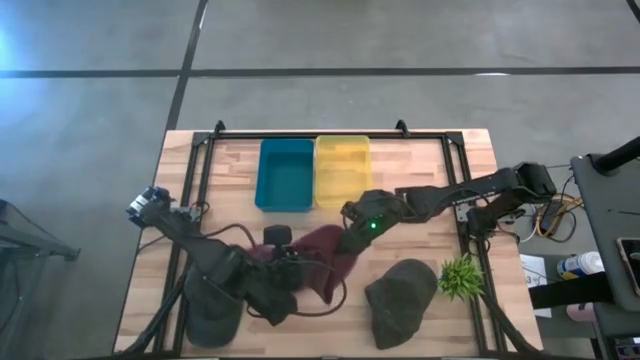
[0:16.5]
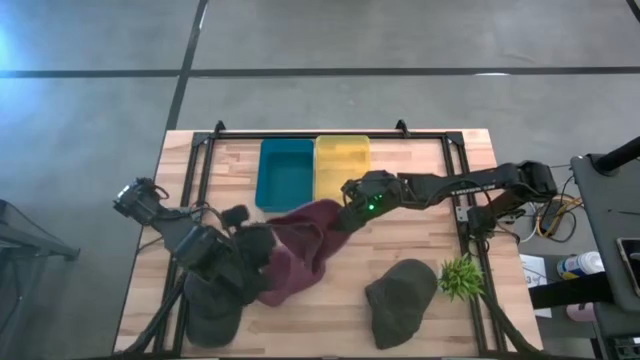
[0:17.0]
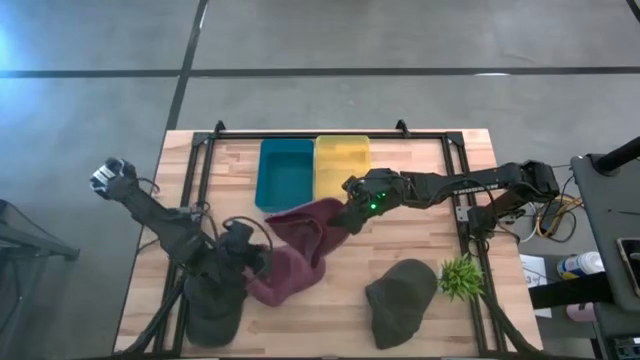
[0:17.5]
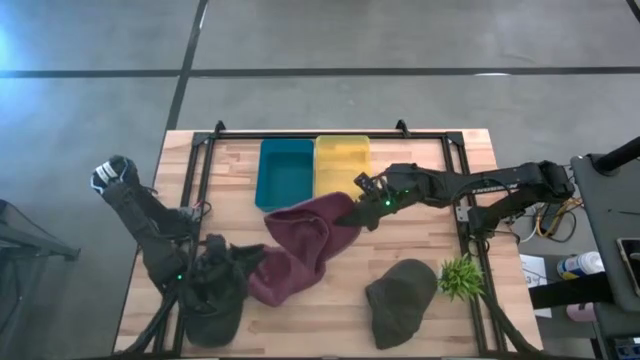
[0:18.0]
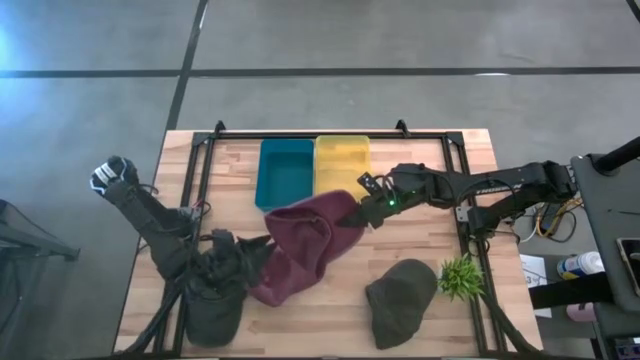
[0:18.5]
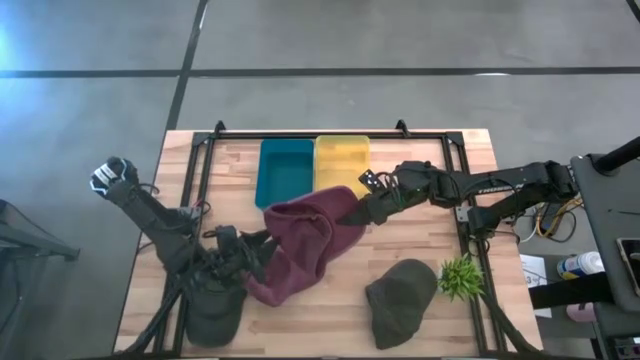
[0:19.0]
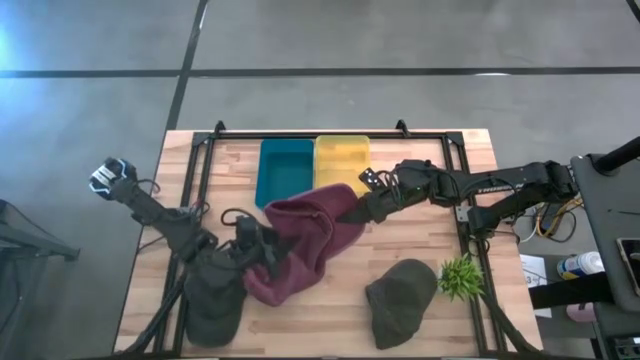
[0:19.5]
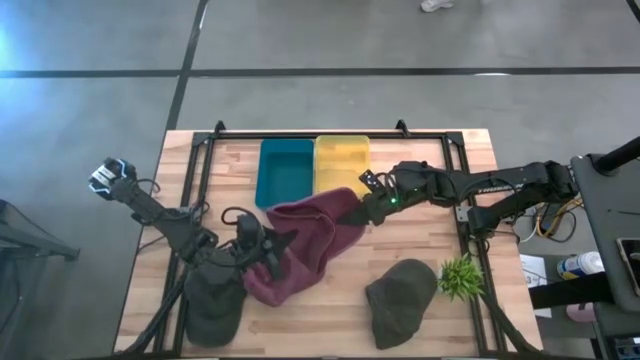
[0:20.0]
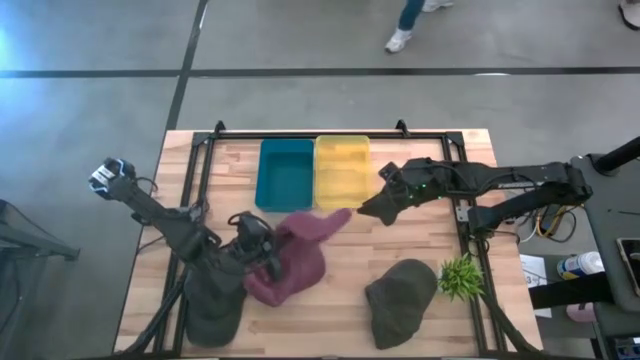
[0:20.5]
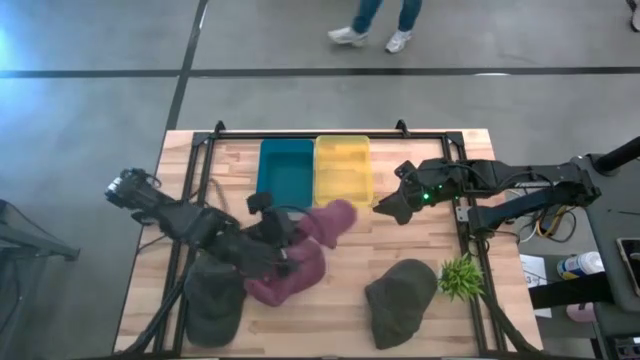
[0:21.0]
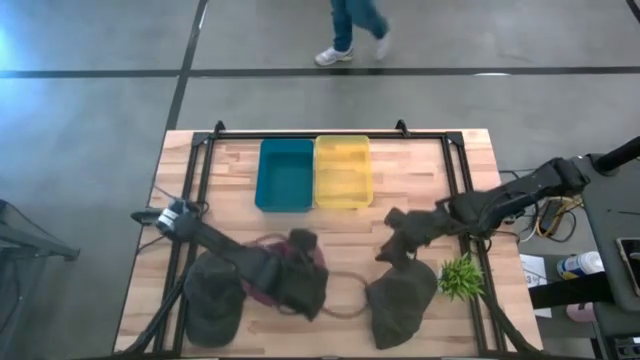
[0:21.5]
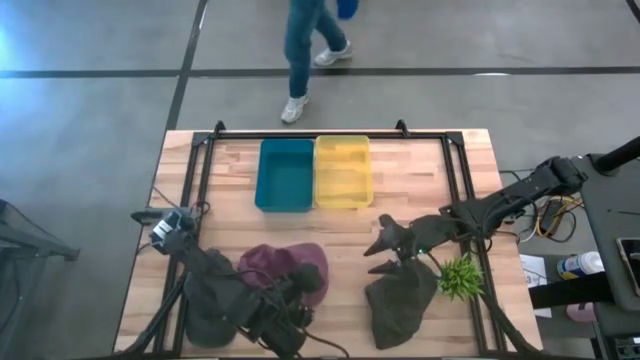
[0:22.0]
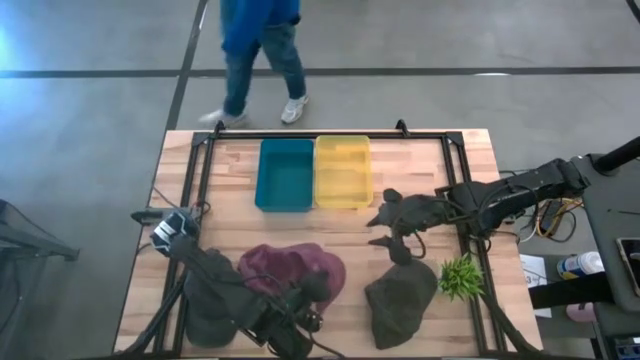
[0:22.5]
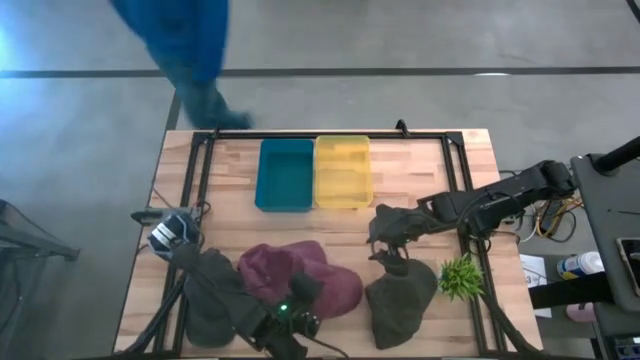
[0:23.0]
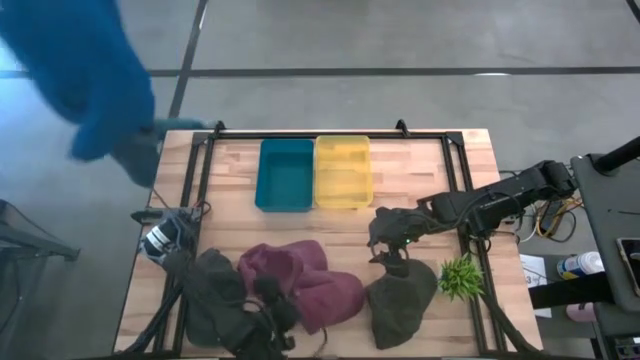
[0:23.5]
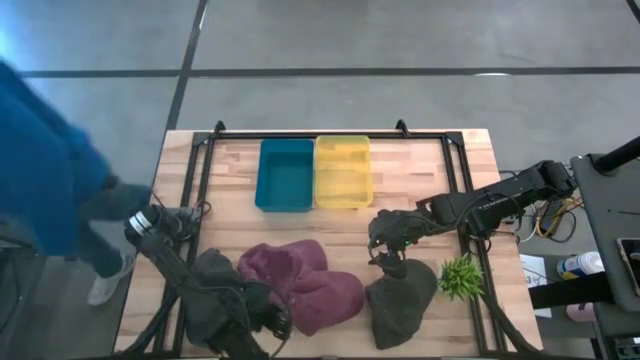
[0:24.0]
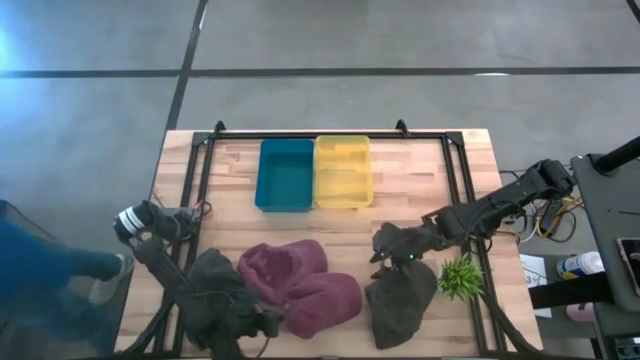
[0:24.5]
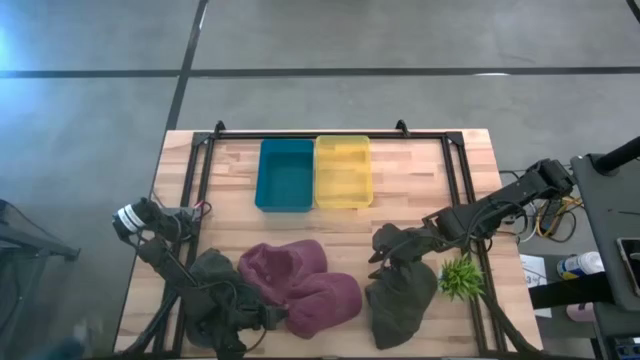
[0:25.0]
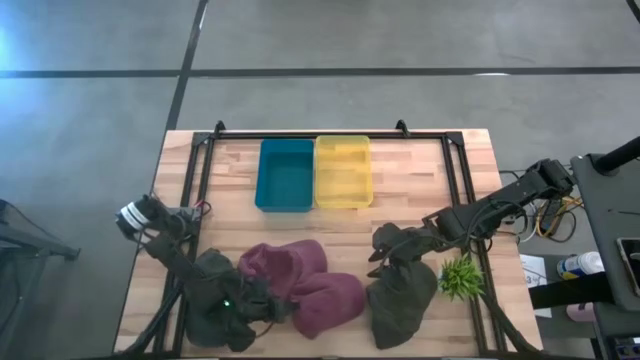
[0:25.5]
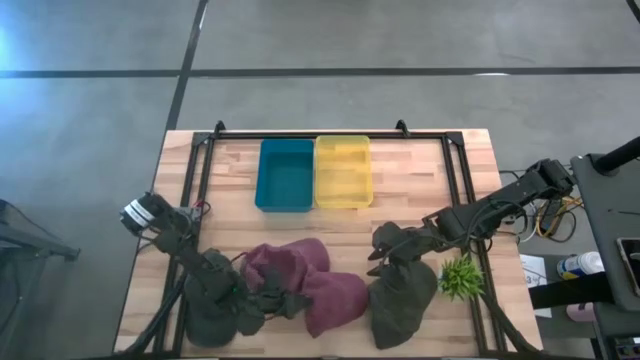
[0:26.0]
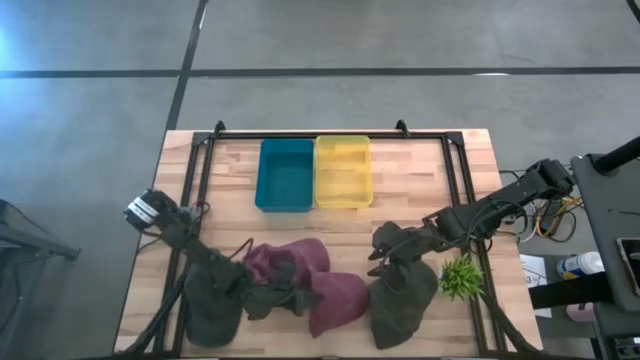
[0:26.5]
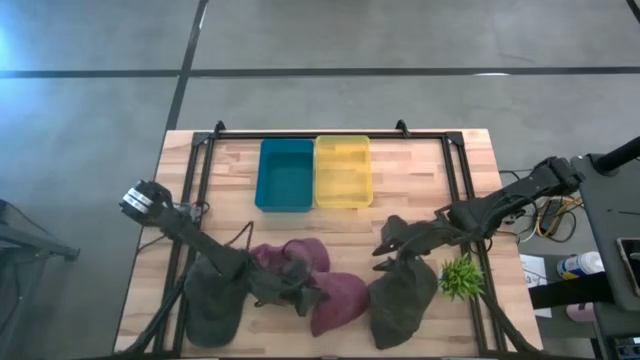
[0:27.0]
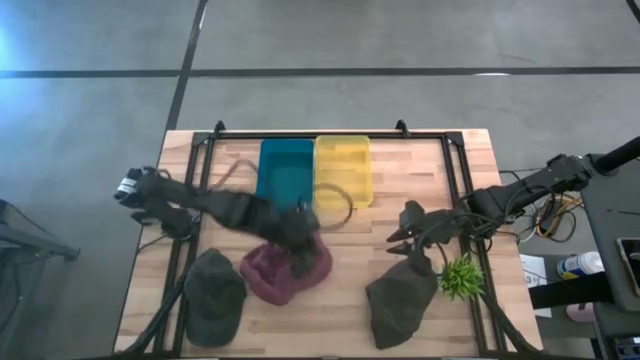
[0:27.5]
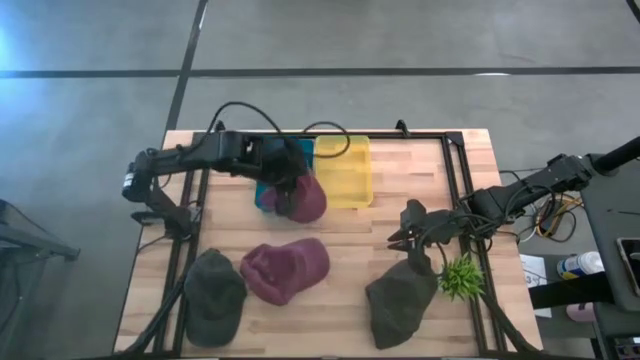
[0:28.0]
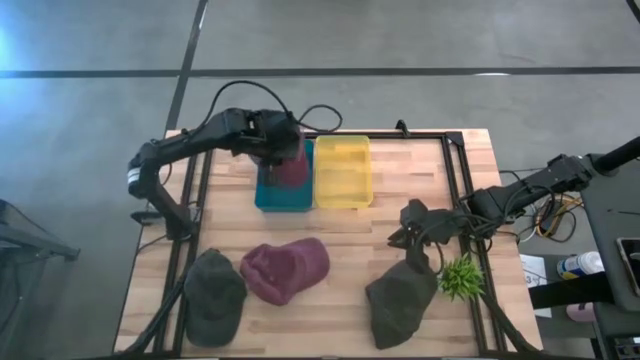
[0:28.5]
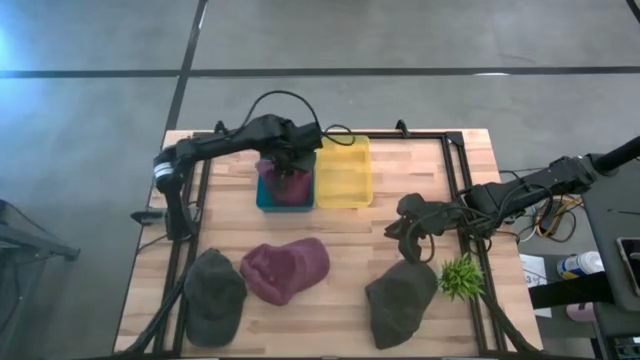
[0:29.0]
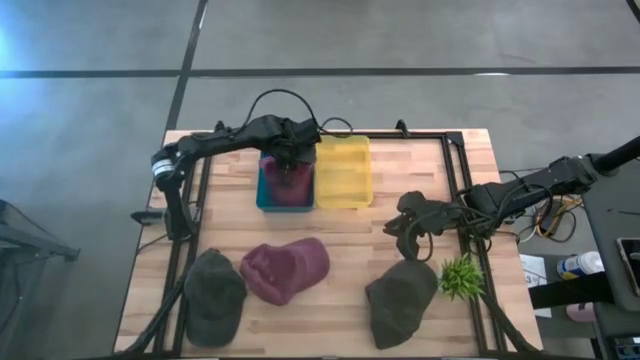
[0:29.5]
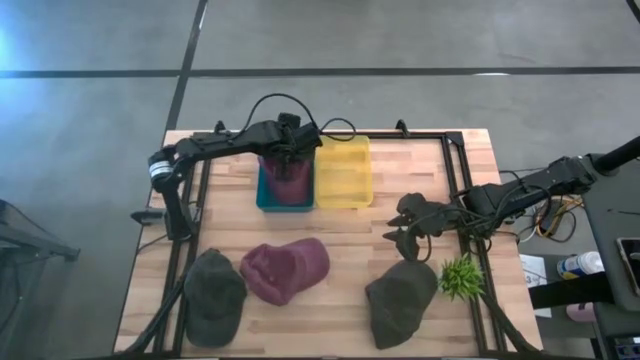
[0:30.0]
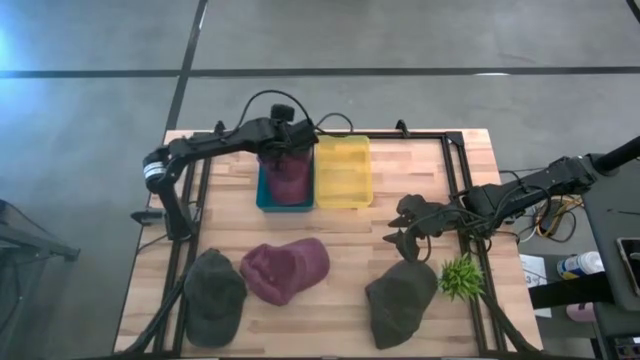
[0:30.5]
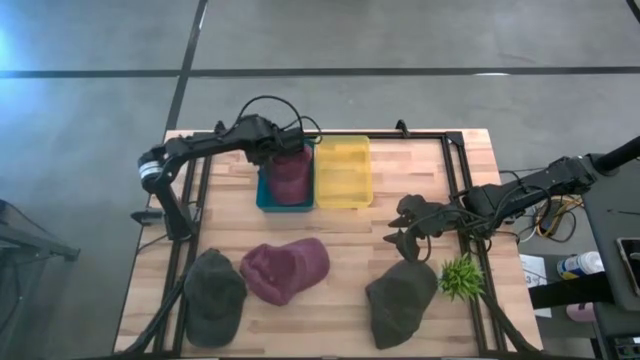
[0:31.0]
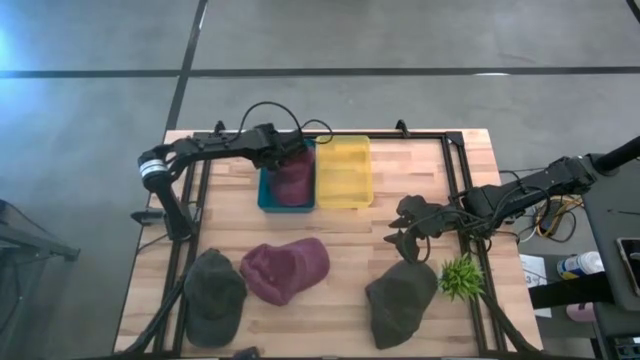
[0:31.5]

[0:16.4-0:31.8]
Task: Pick & Place hat
Put the top pink cap into the blue bin

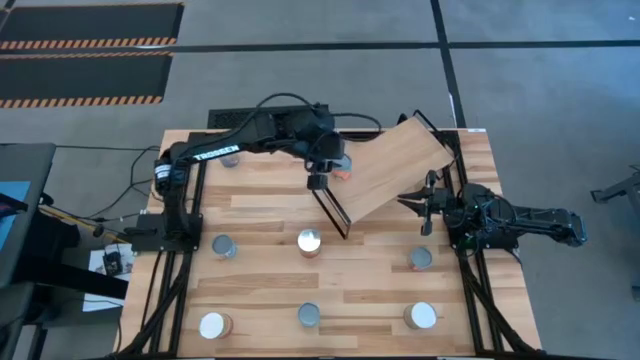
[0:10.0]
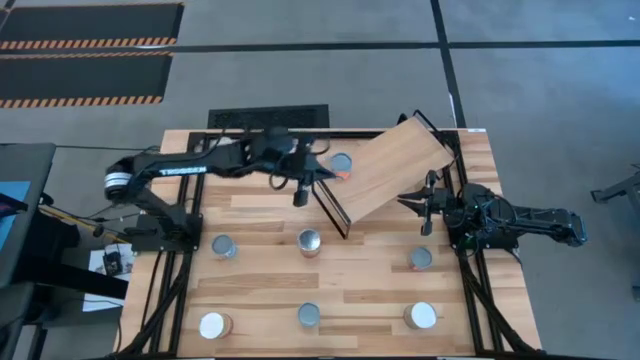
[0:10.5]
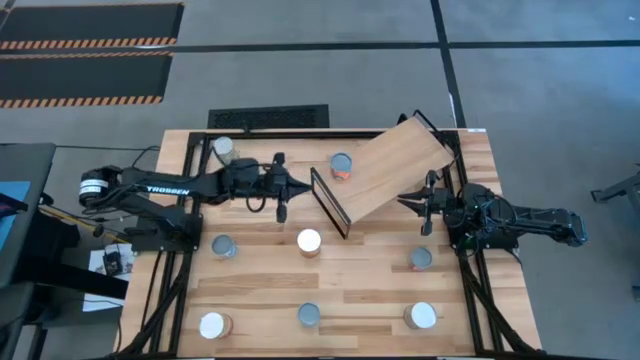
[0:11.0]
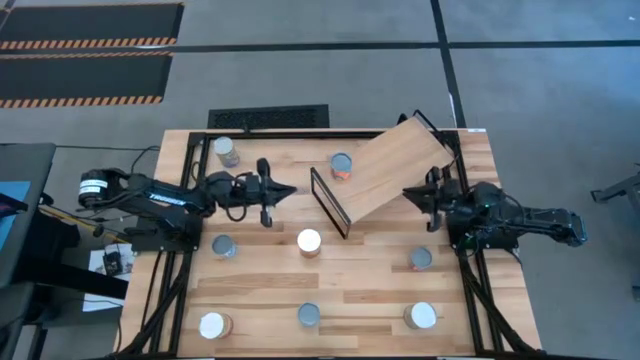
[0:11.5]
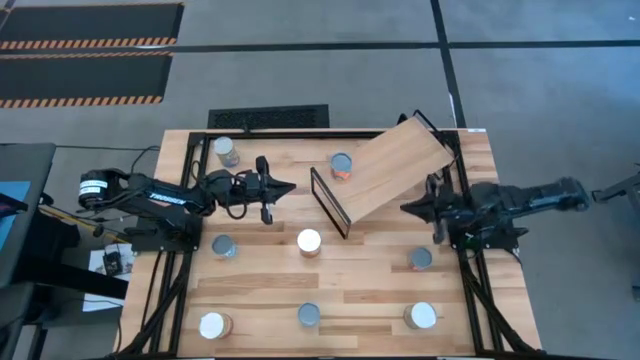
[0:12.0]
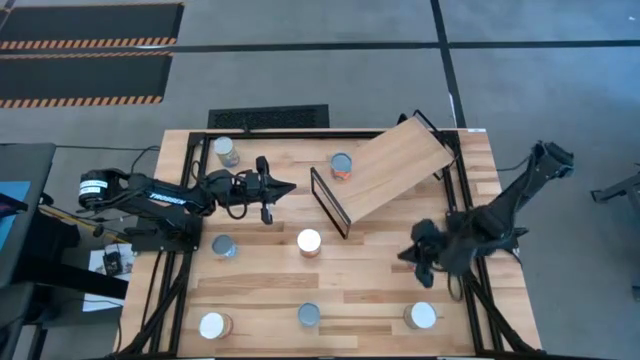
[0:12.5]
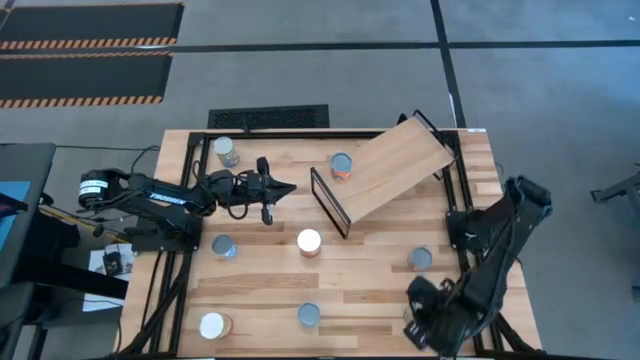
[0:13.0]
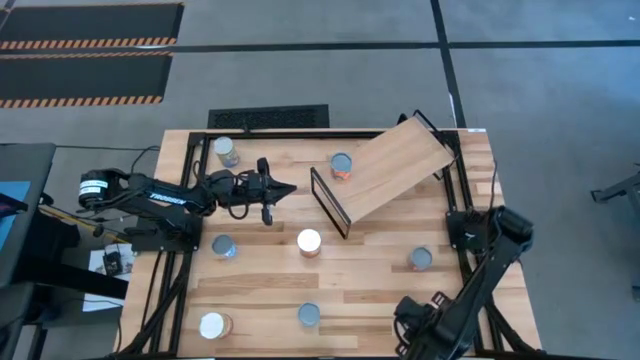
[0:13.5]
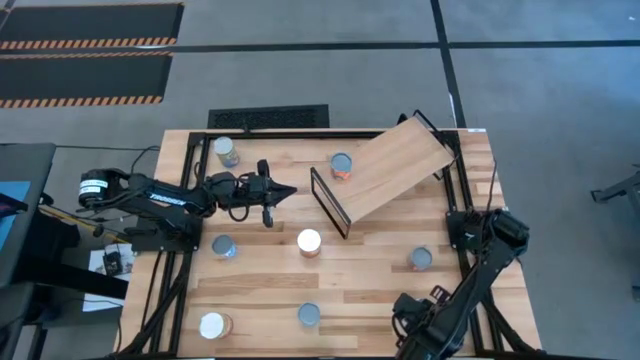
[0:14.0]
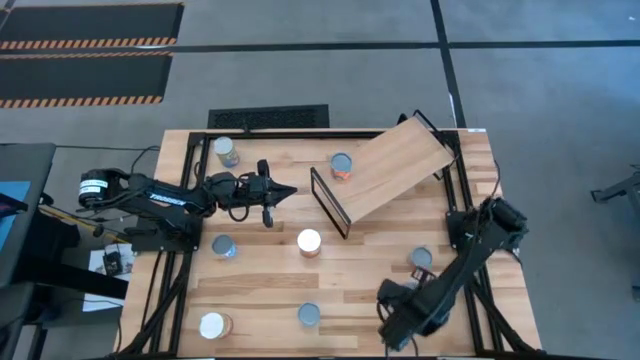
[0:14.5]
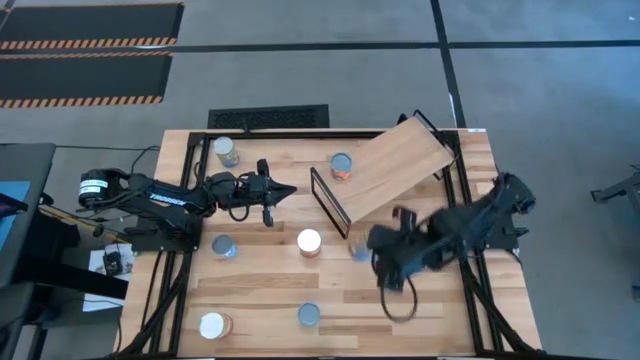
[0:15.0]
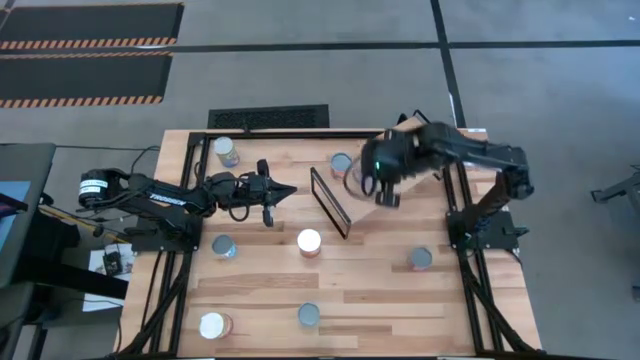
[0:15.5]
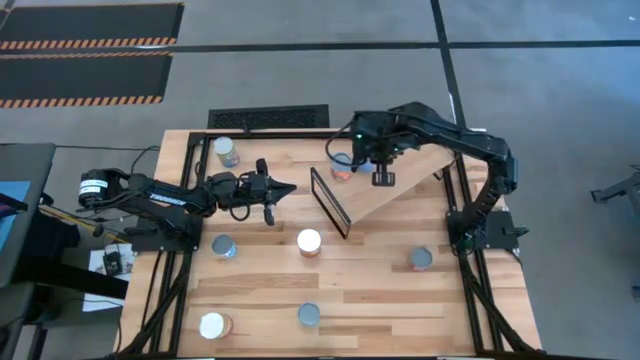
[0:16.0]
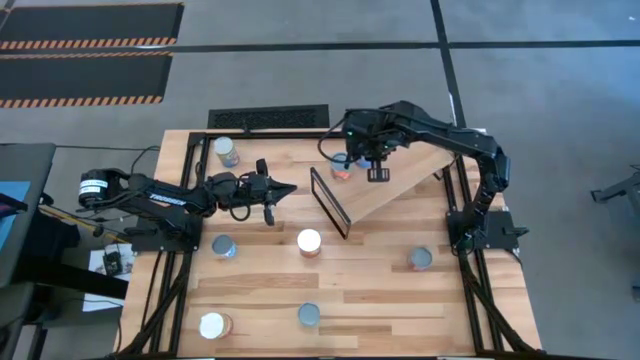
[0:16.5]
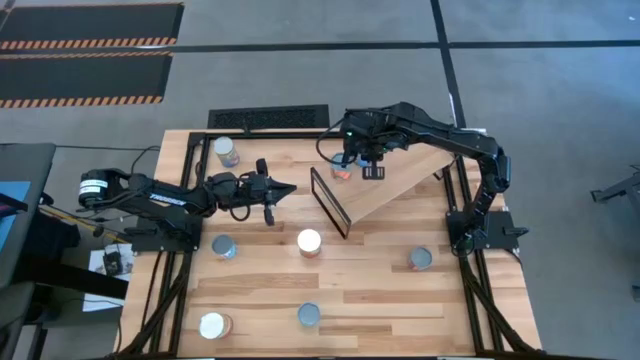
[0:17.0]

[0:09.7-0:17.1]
Task: Pick and place cans onto a shelf
Put the canned peaches on the shelf
